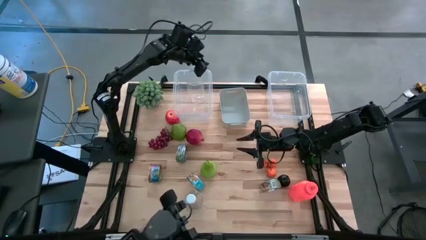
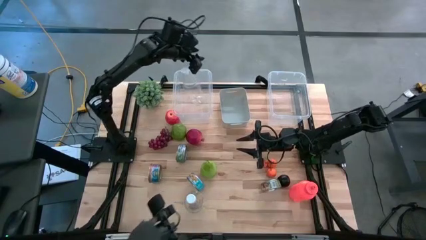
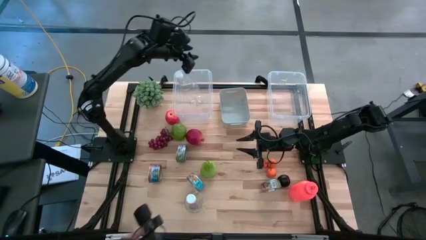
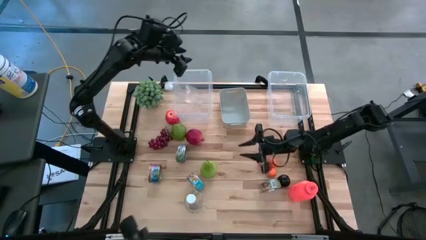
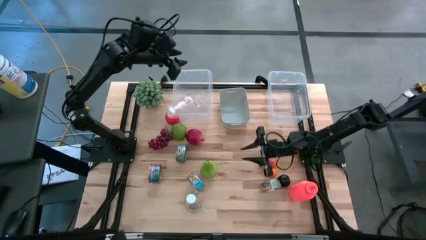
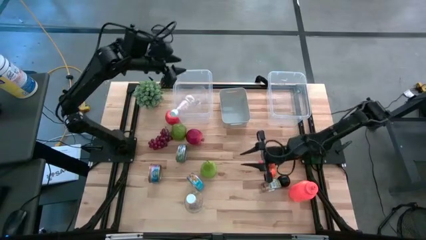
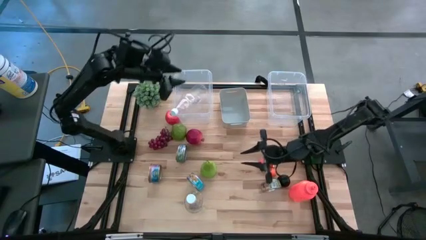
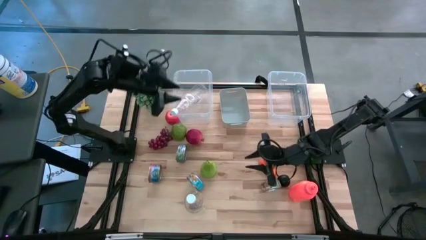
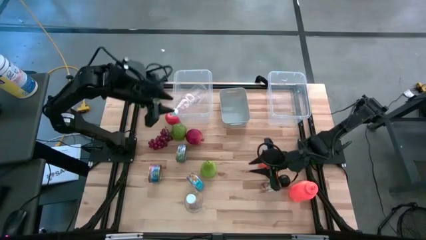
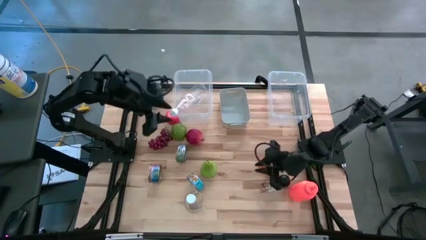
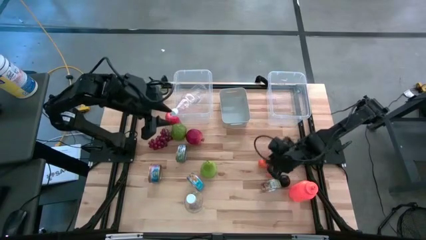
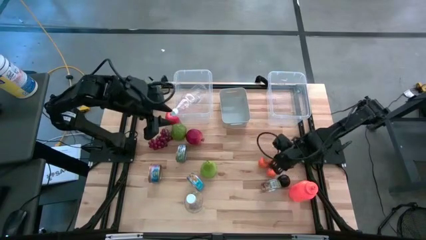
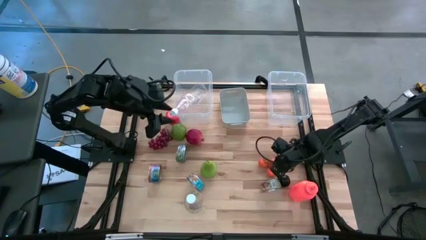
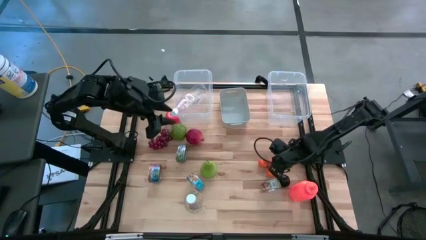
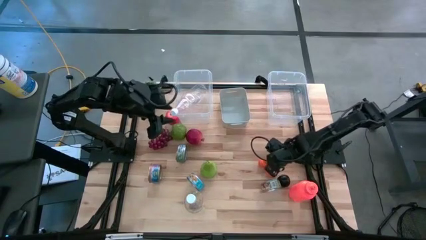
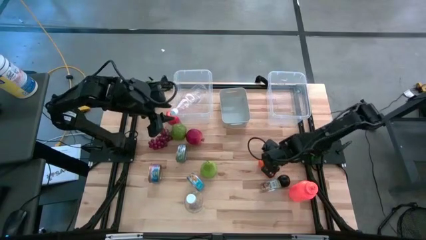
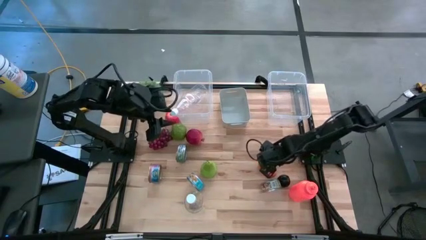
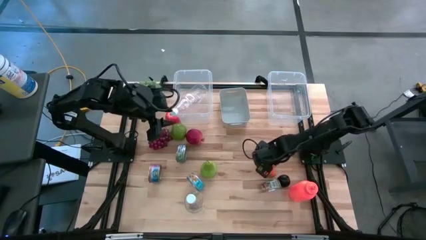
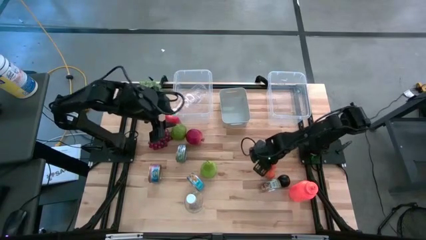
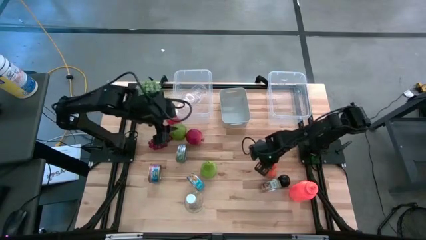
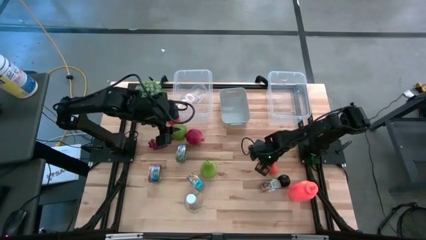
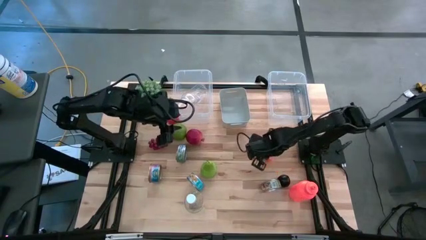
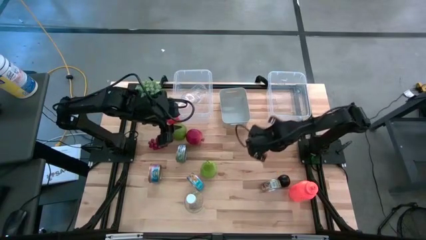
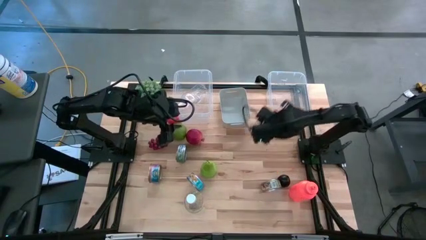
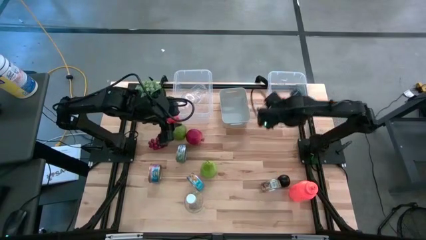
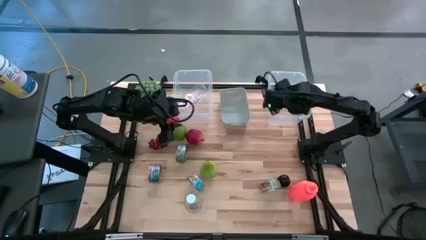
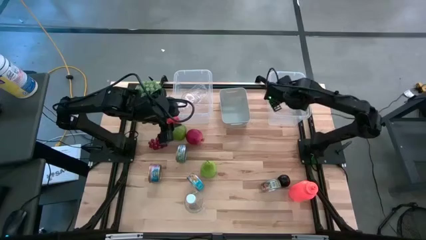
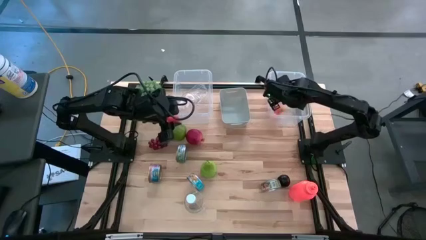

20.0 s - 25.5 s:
Task: Pick & Place Food Item
Put the oranges into the right transparent bin

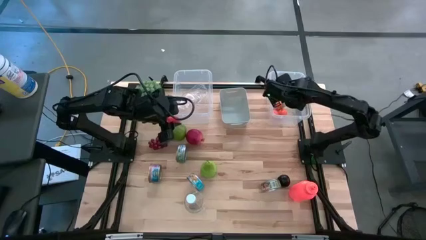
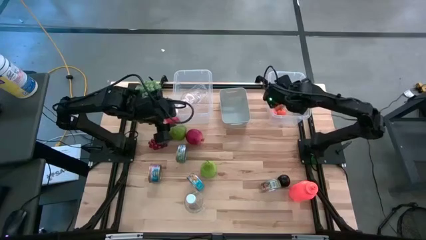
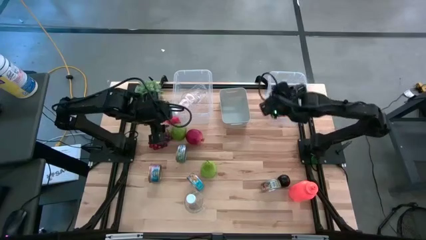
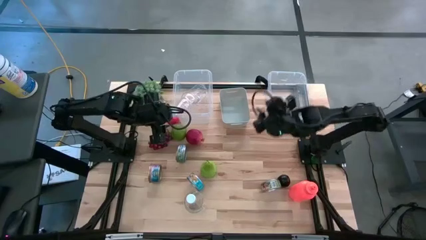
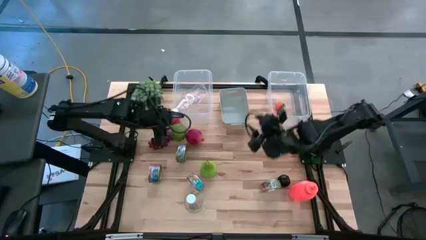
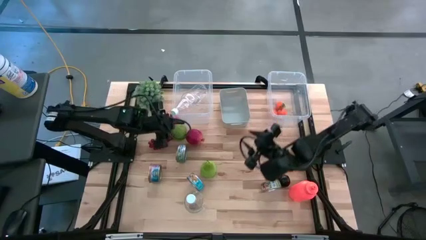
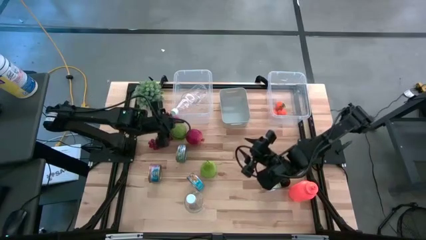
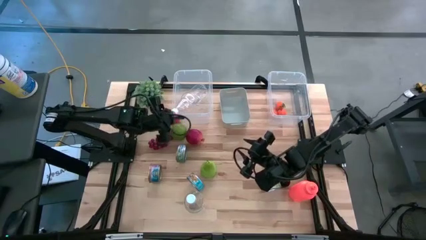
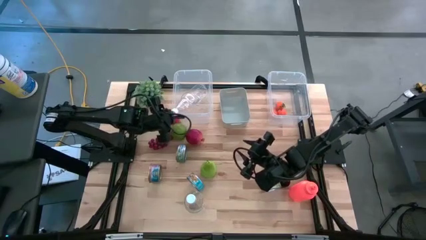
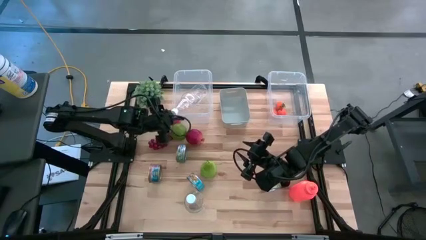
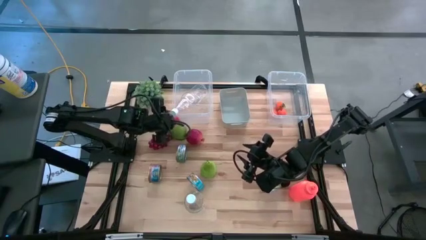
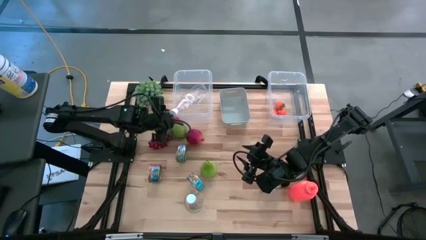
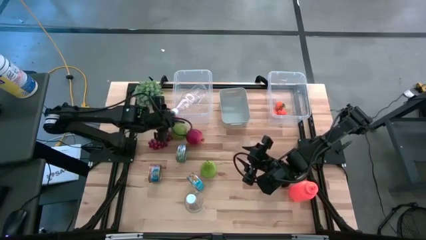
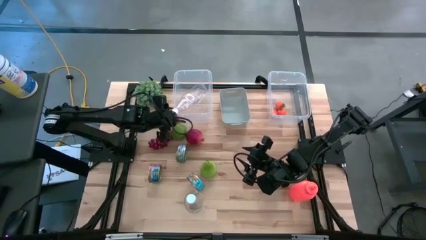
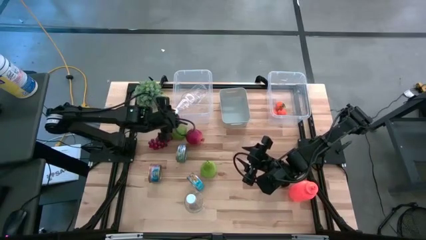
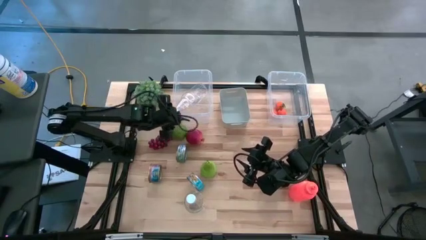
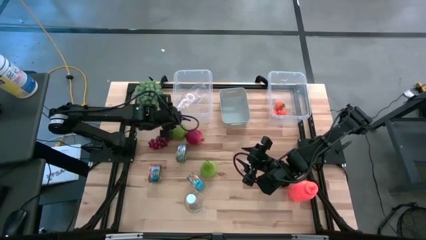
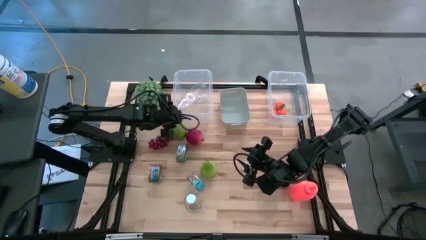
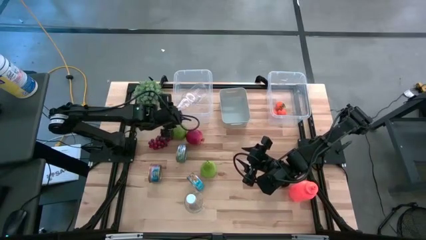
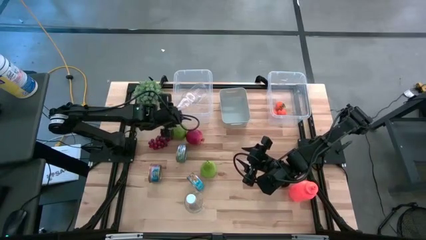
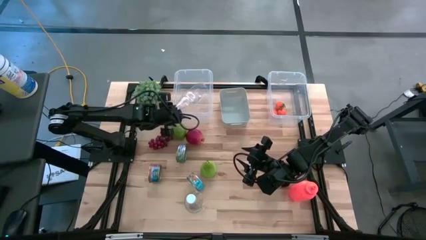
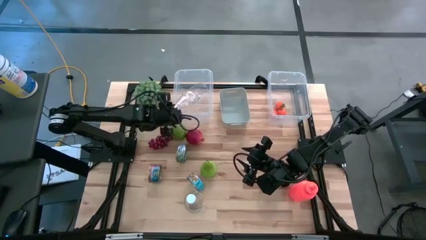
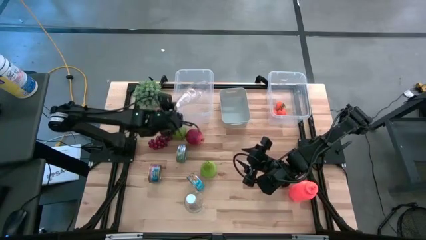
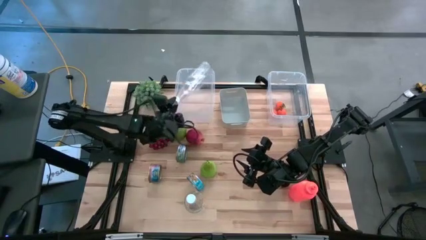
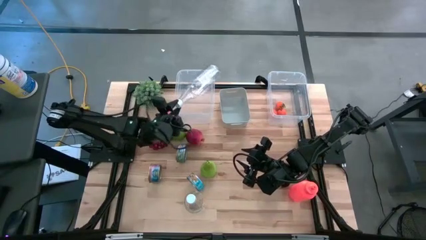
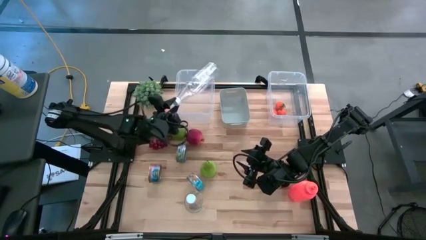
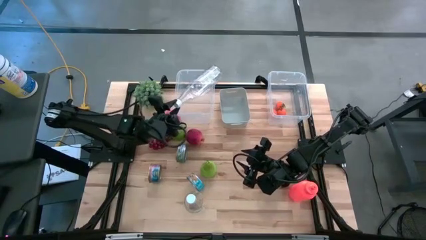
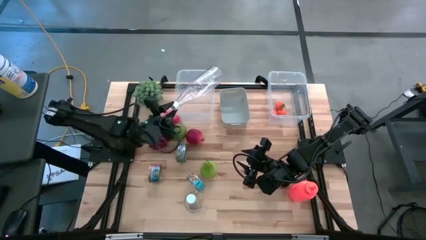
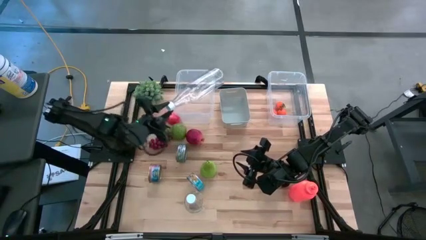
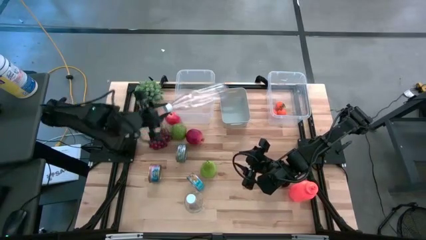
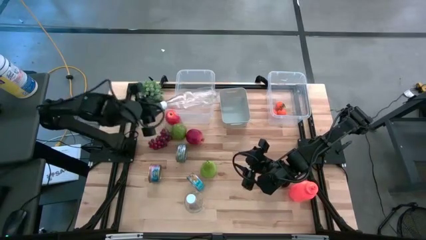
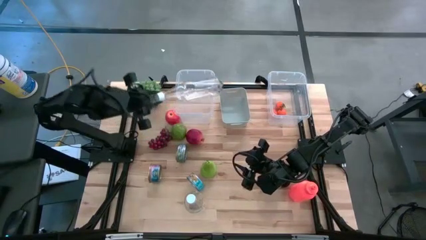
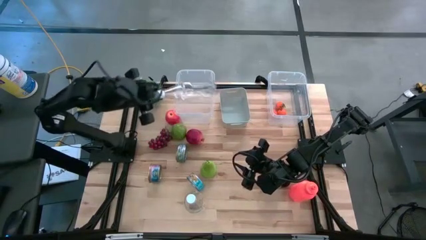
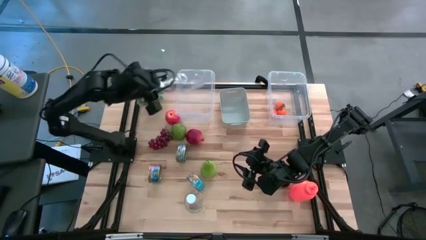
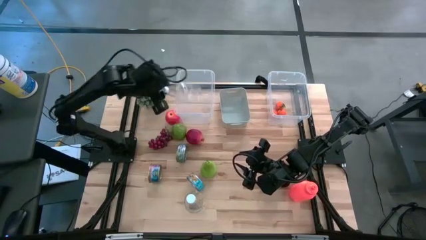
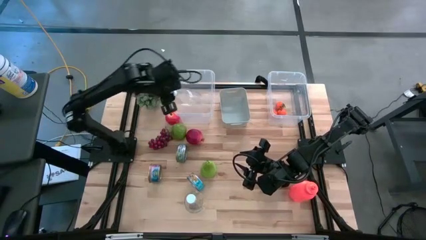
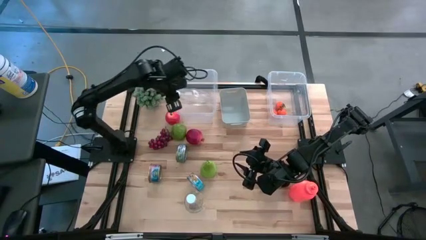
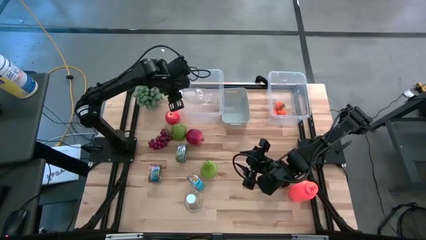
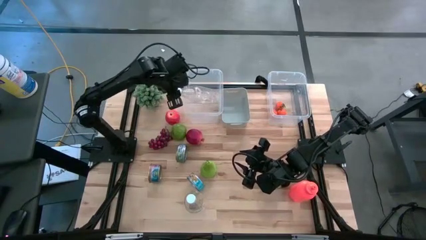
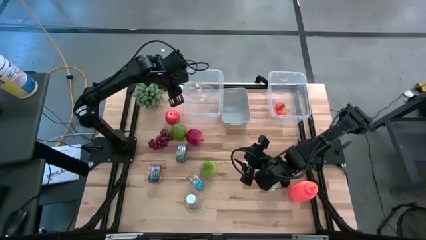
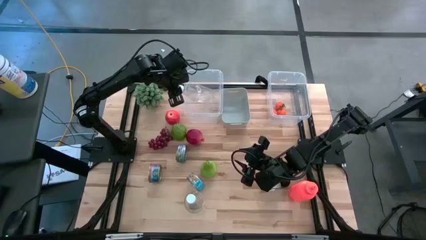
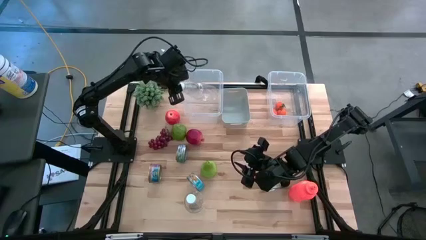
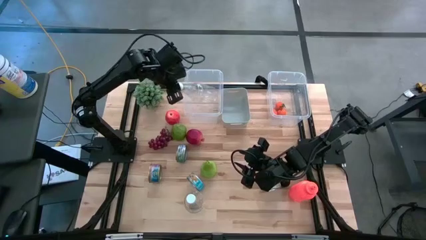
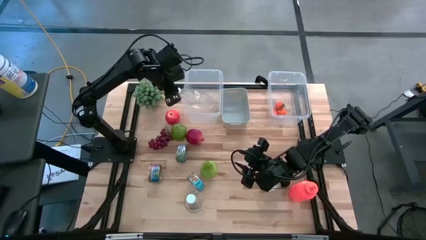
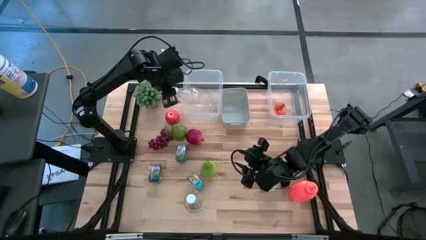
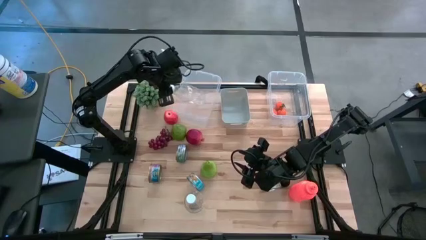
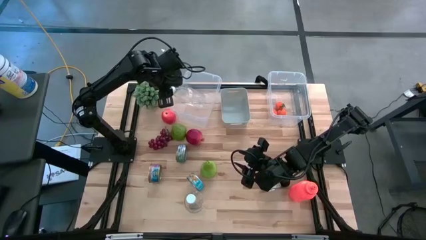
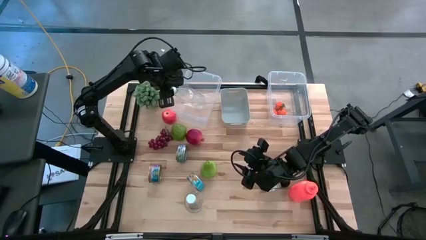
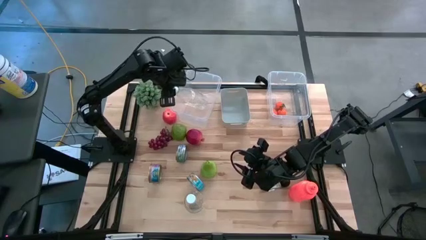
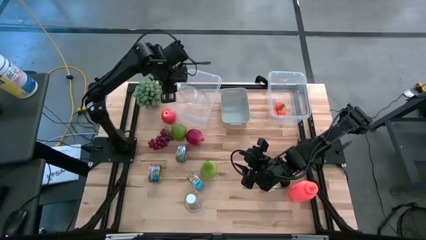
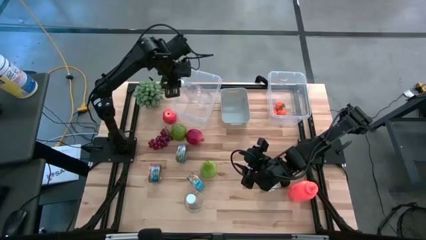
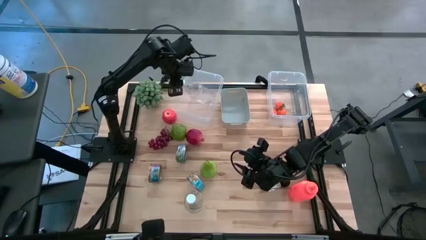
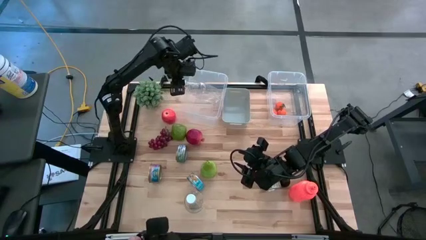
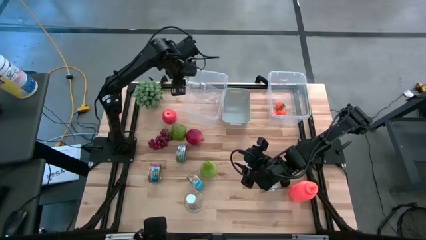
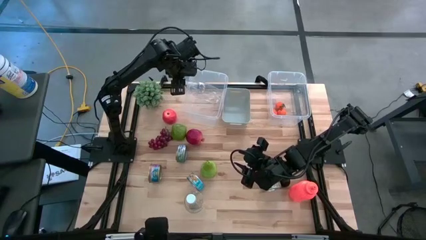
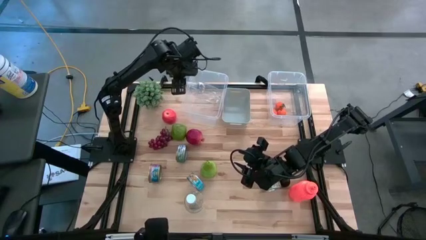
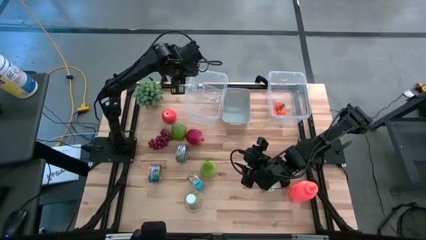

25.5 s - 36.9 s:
Put the transparent bottle into the left transparent bin upright
